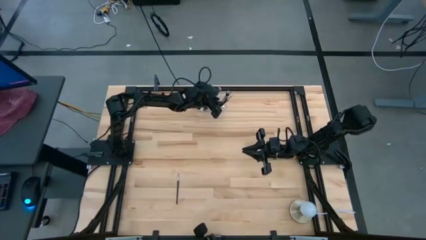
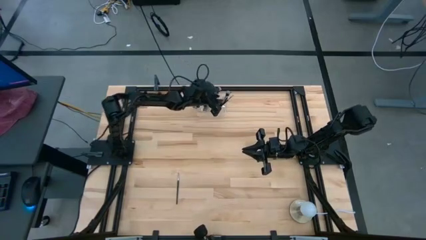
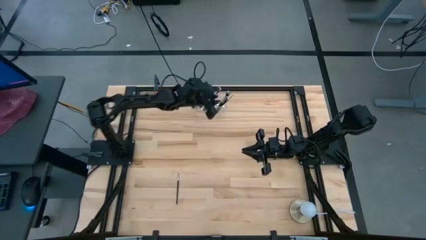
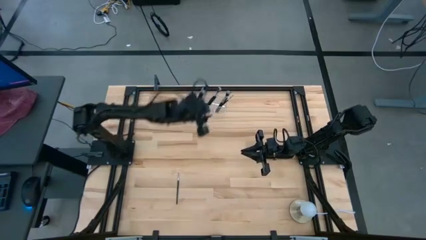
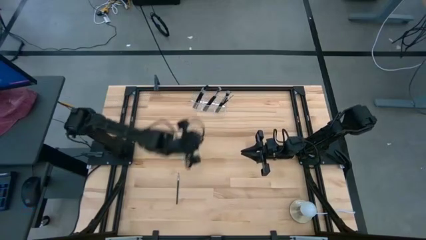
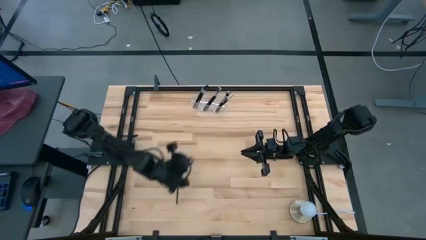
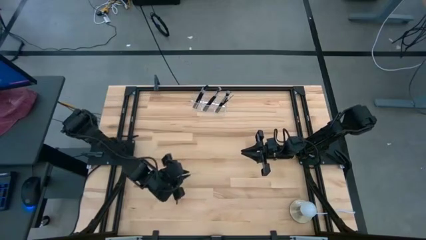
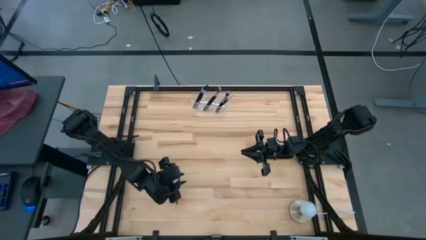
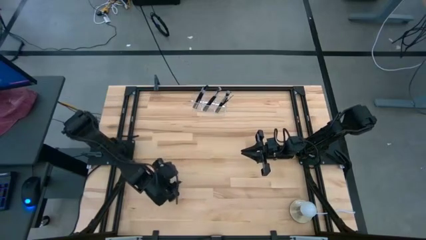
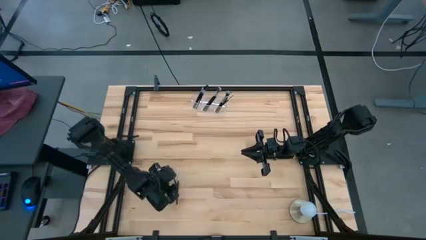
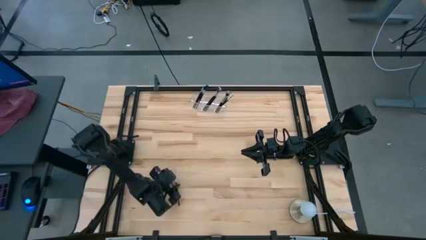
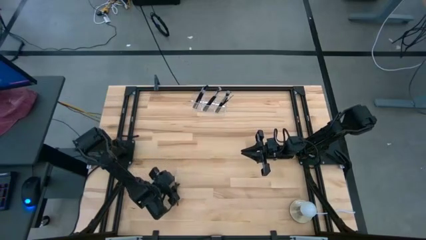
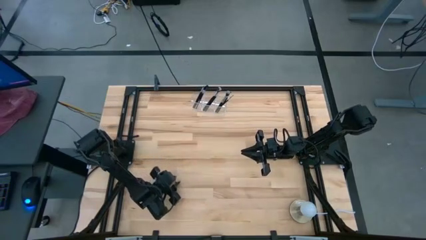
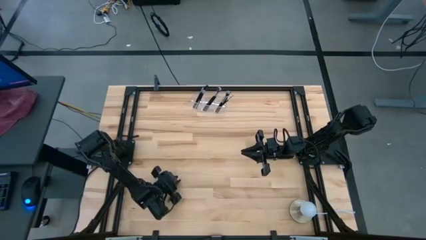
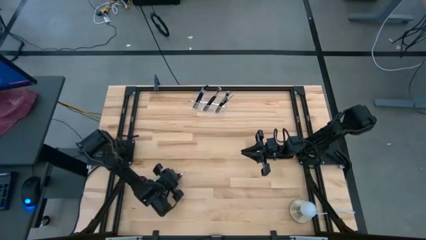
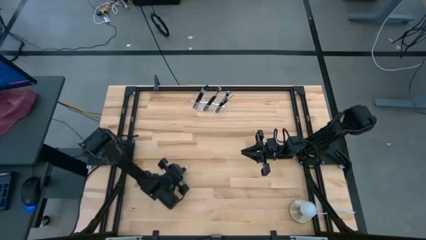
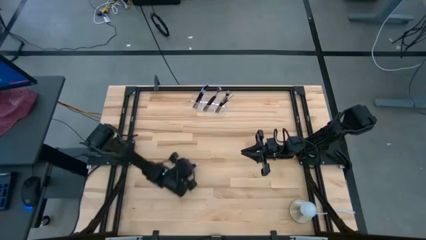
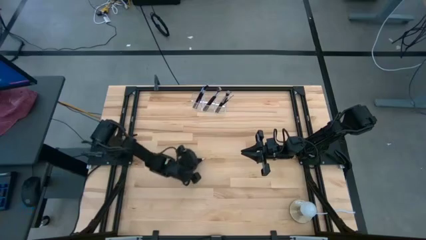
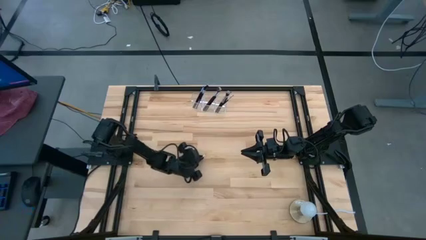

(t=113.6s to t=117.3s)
Task: Put items in baskets/containers
Put the black liner brush into the transparent organizer

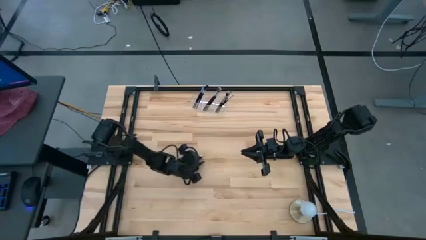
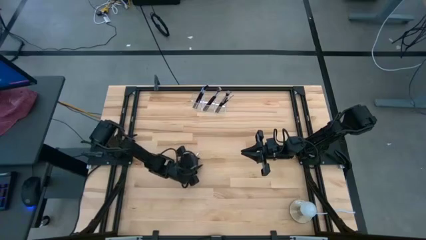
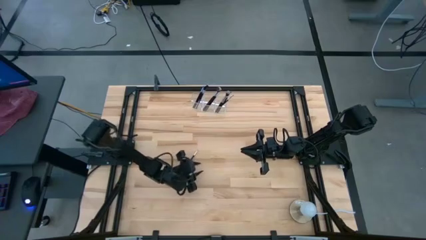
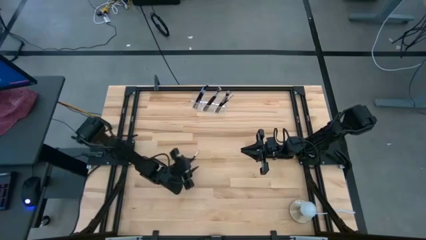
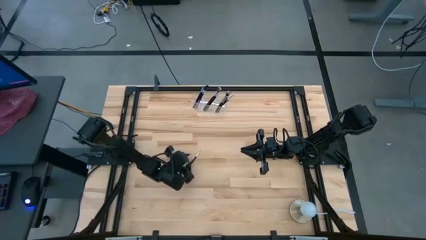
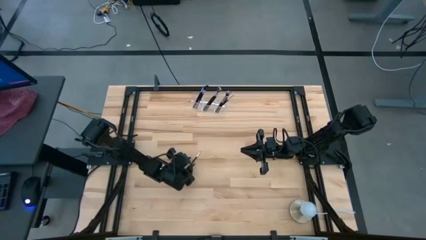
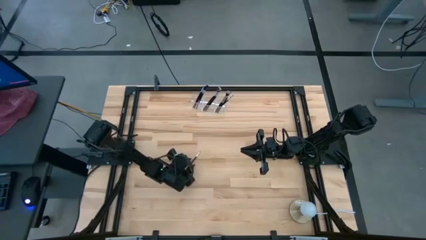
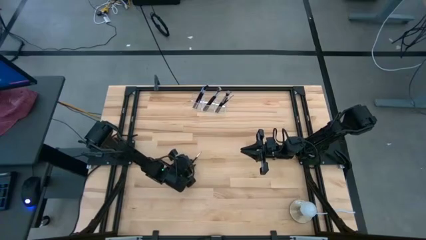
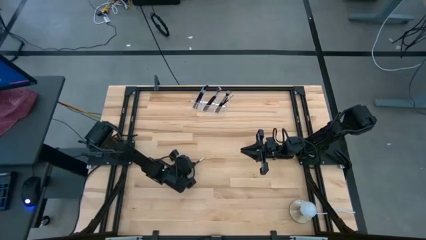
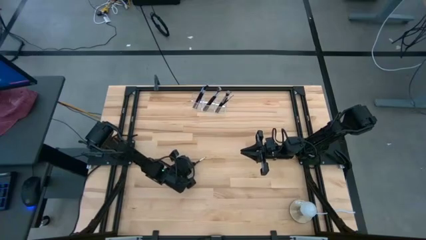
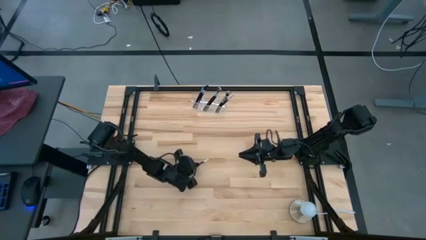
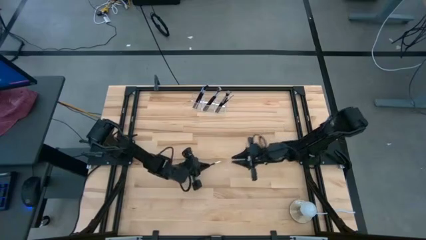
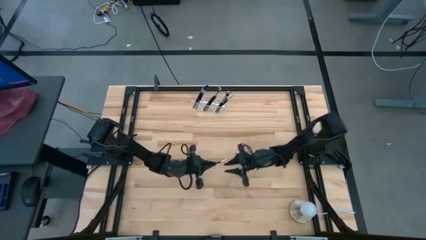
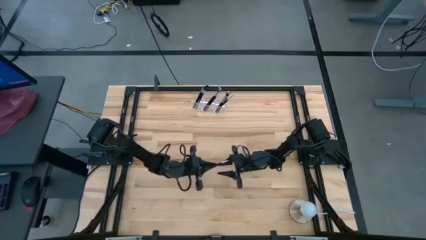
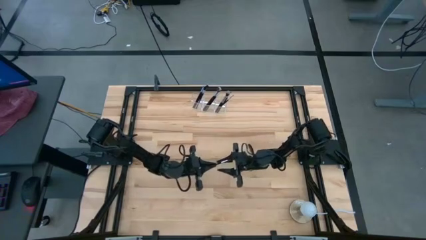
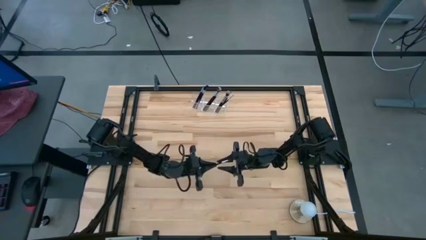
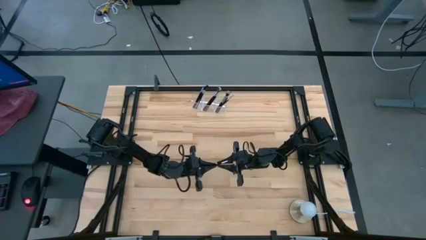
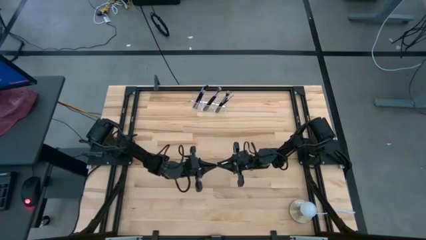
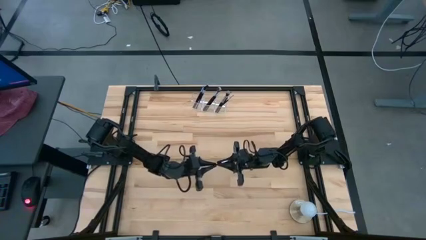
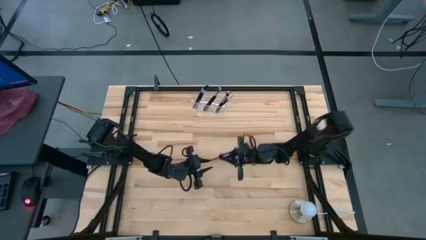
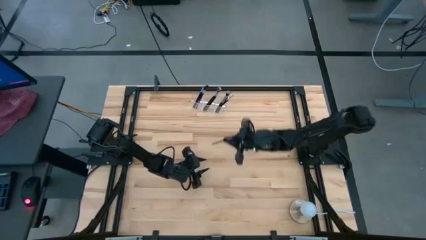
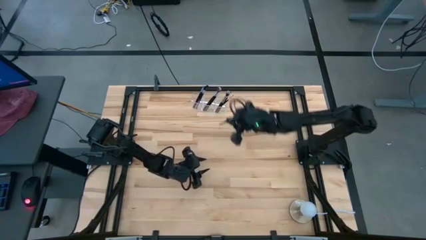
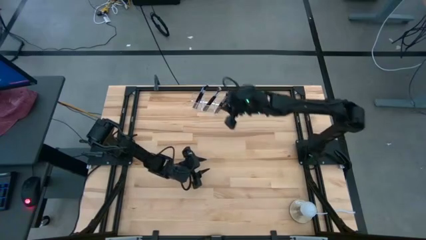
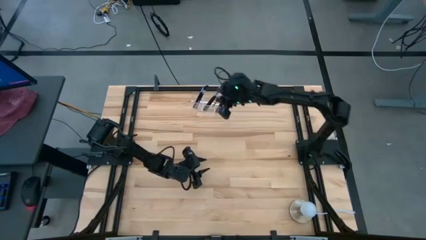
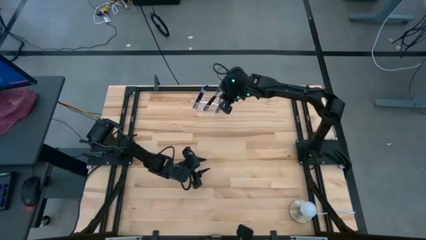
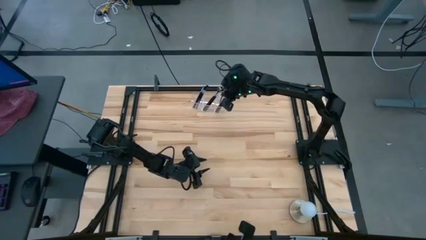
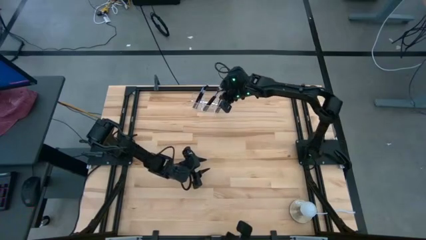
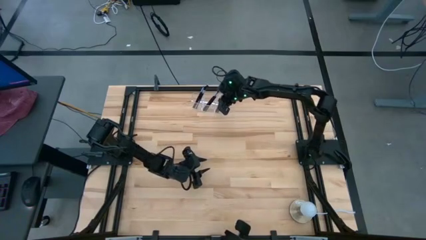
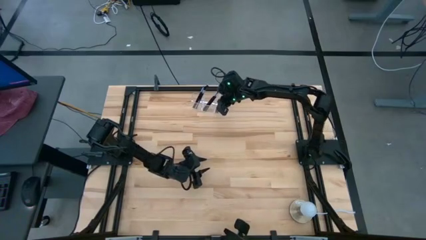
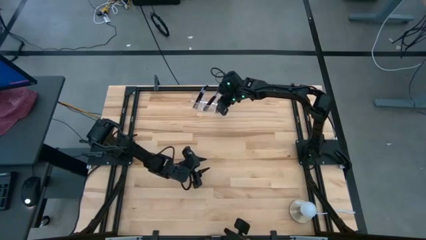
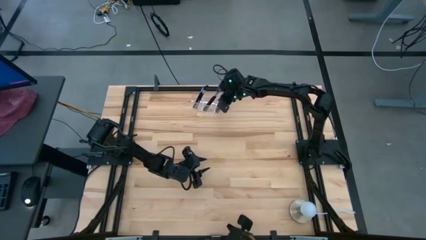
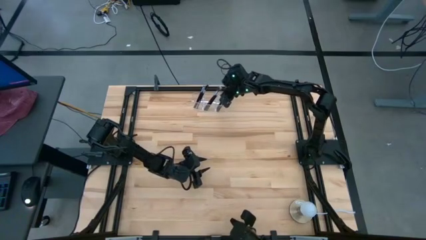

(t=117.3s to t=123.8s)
Put the black liner brush into the transparent organizer

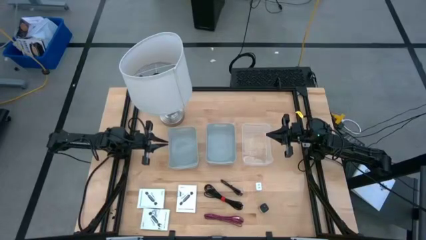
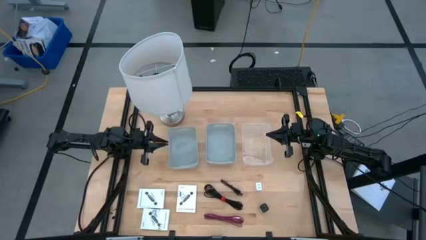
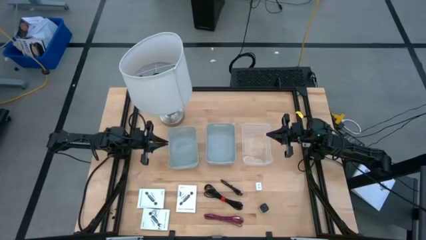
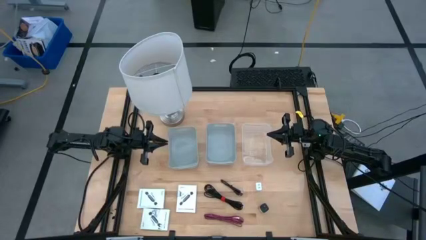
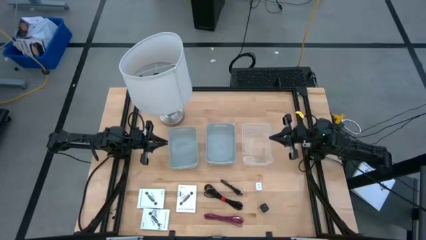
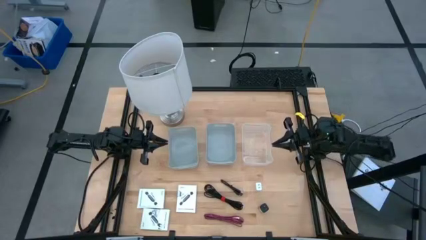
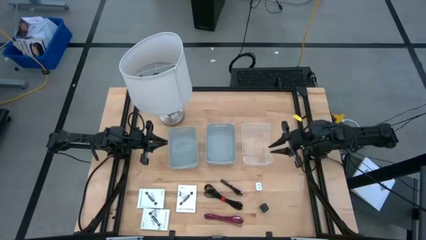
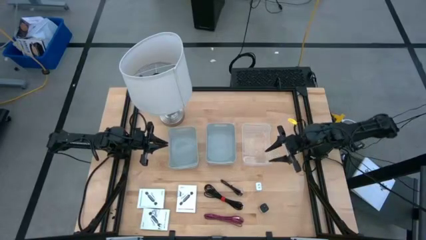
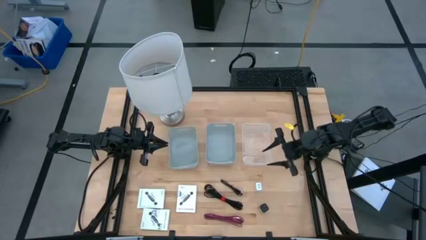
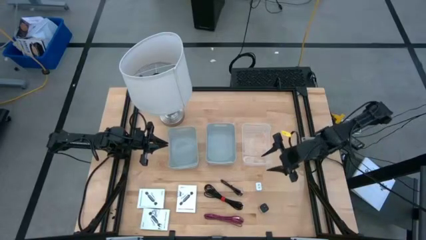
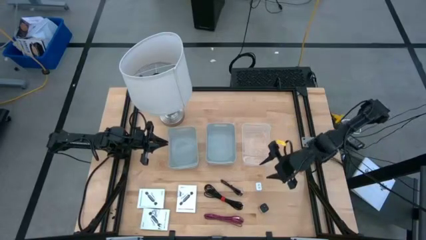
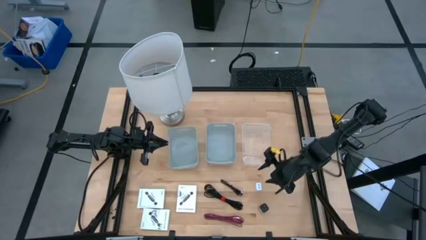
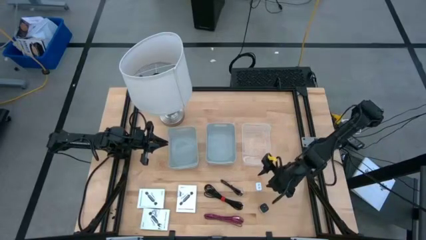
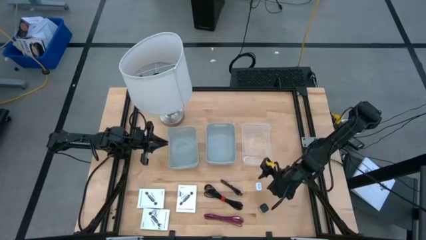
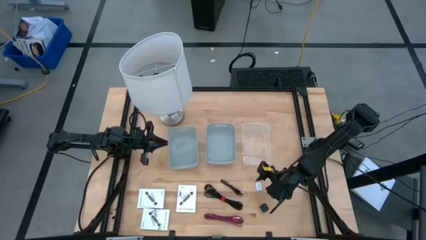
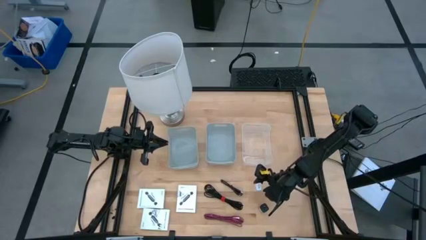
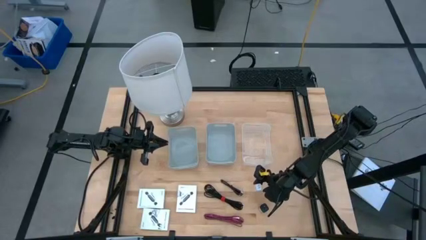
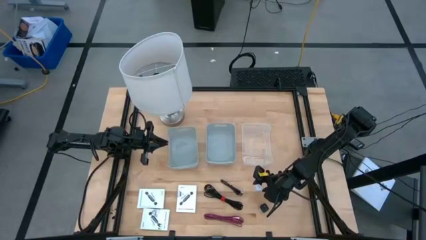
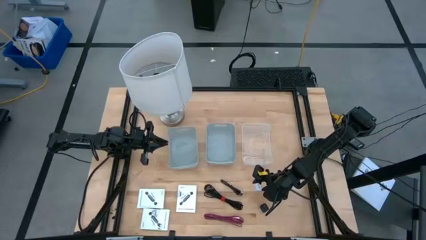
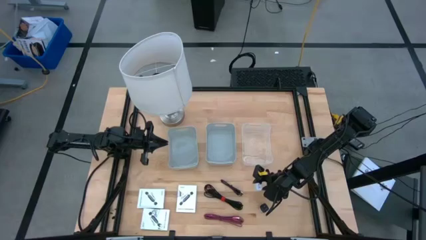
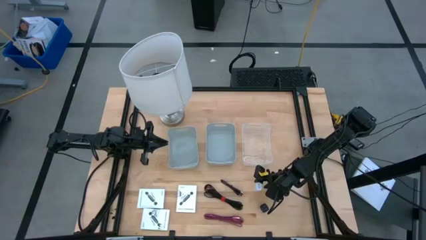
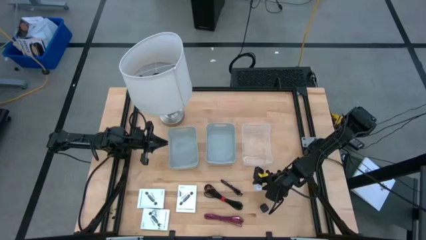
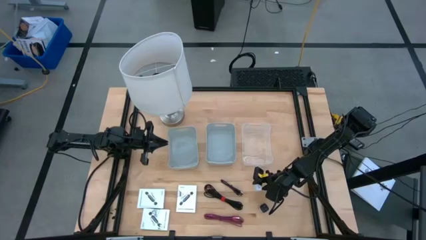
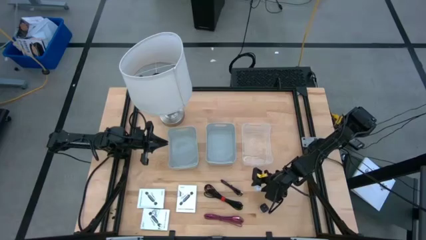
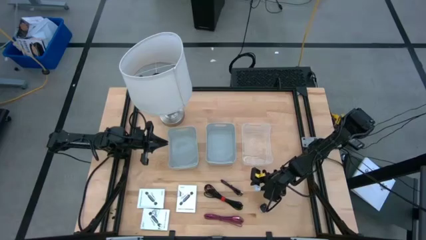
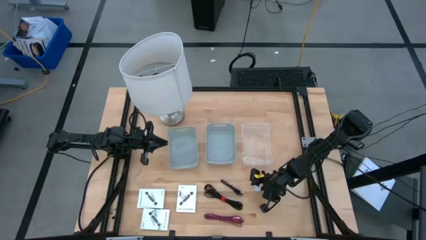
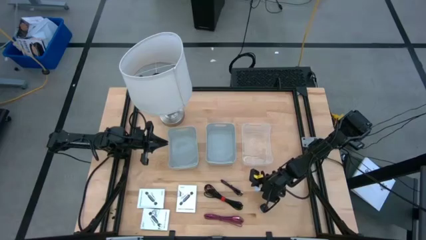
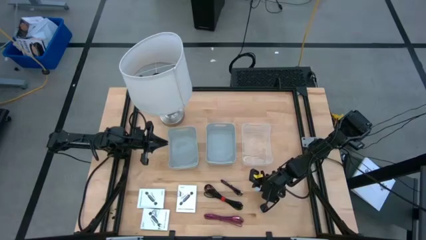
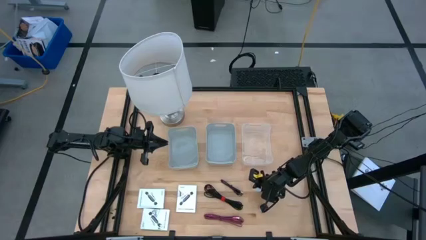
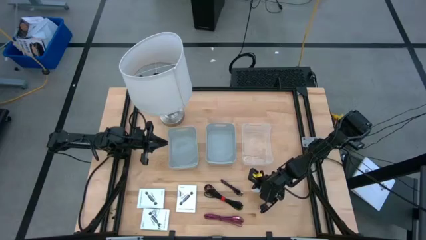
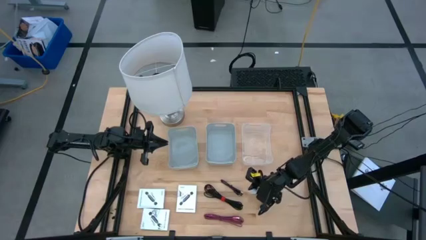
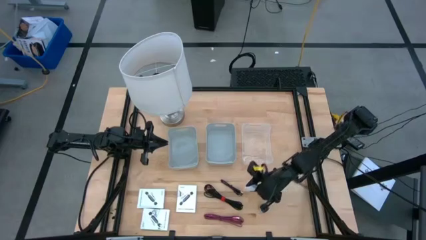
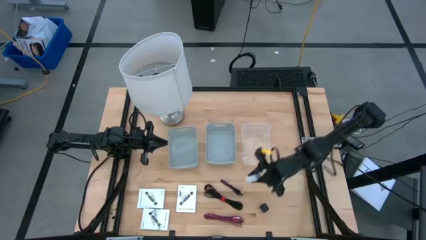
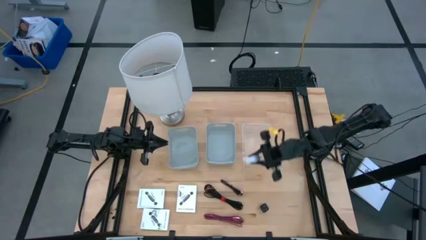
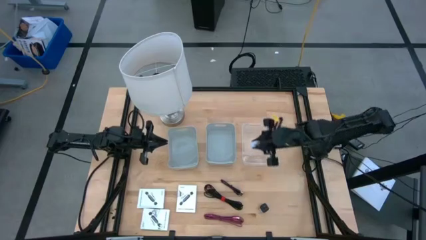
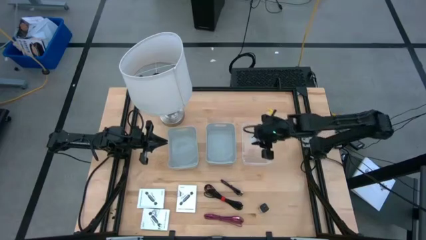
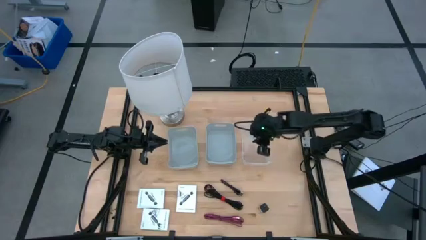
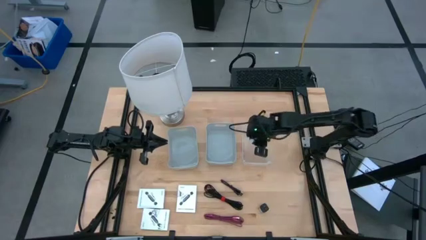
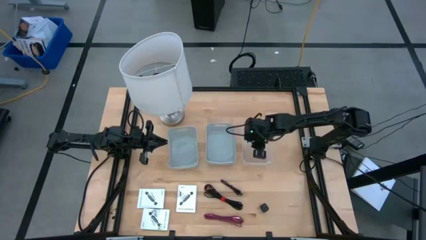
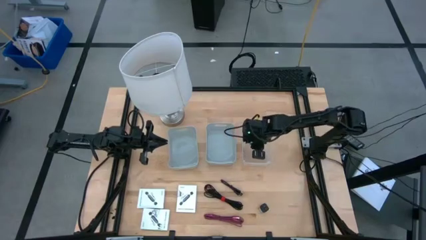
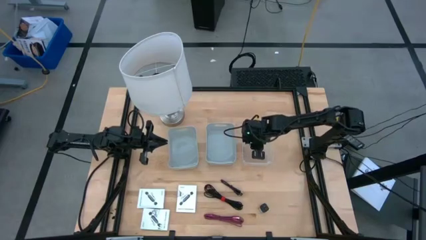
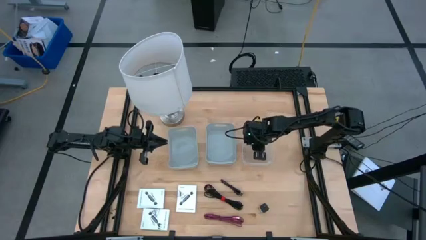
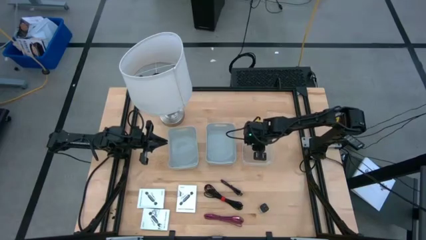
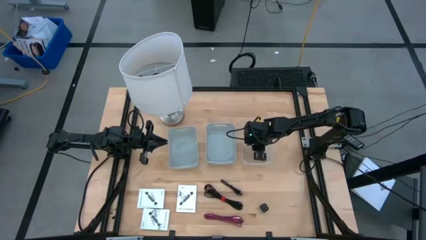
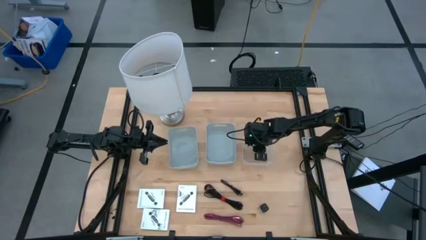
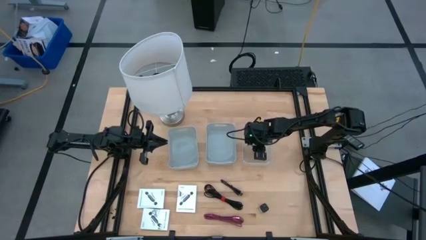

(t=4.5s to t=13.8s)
Task: Pick and place items into bin
Put the white charger adapter into the transparent bin
